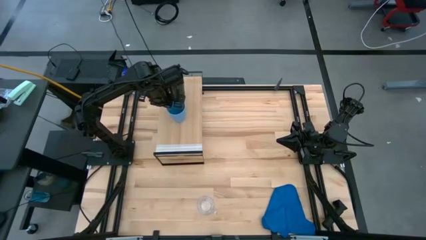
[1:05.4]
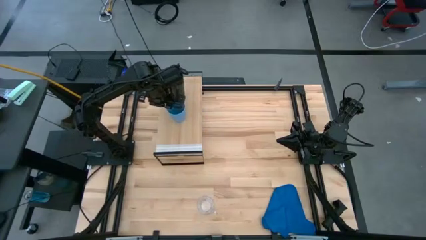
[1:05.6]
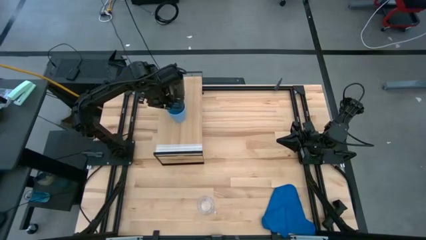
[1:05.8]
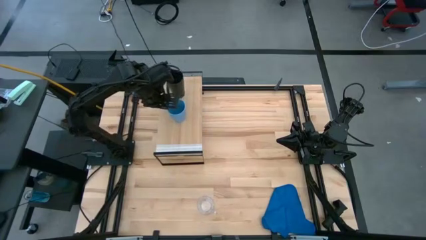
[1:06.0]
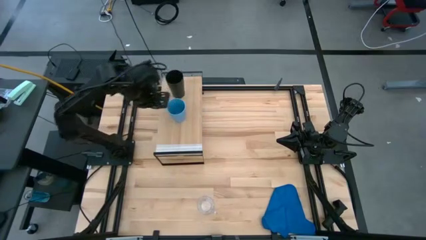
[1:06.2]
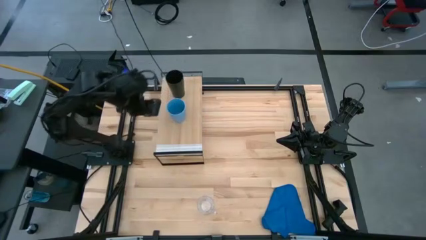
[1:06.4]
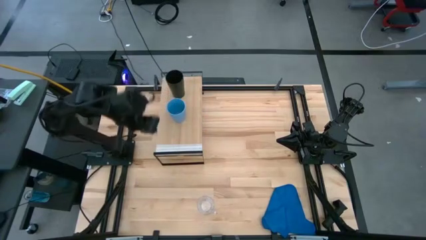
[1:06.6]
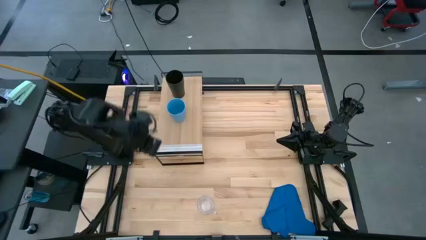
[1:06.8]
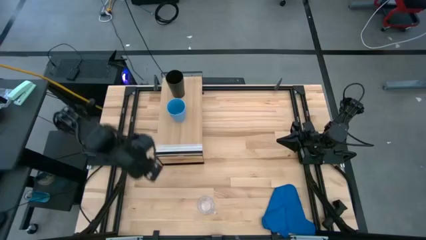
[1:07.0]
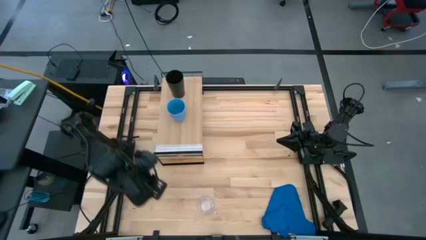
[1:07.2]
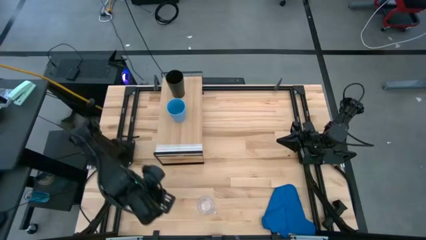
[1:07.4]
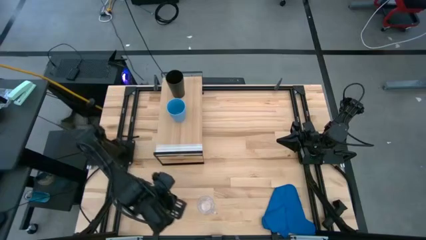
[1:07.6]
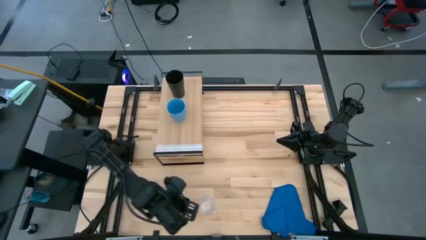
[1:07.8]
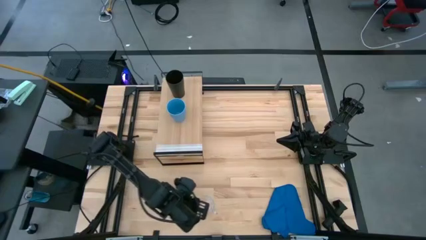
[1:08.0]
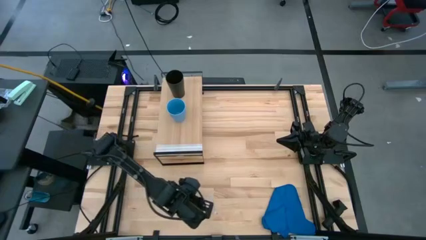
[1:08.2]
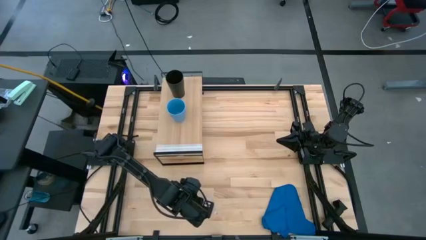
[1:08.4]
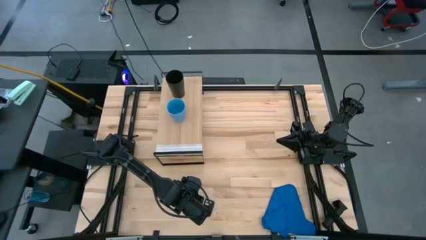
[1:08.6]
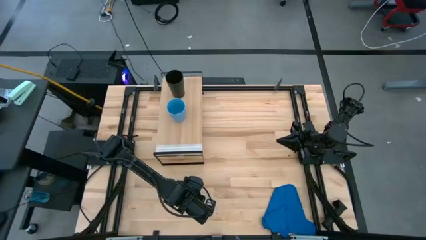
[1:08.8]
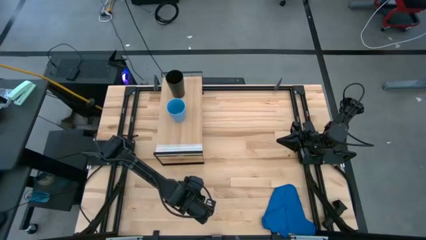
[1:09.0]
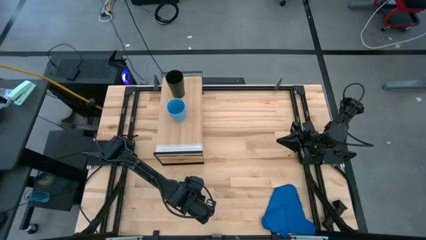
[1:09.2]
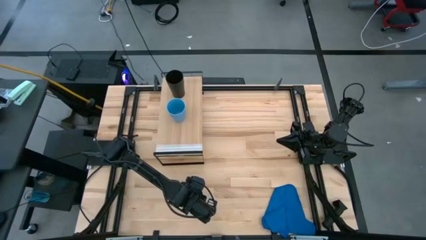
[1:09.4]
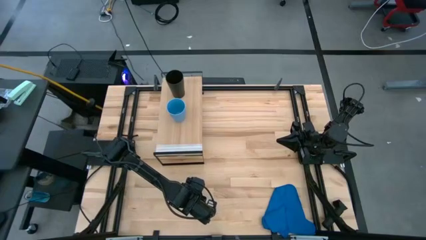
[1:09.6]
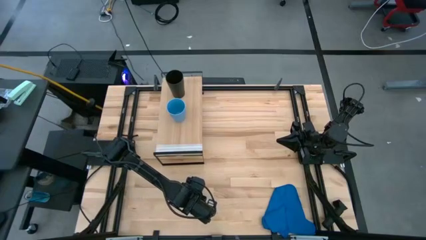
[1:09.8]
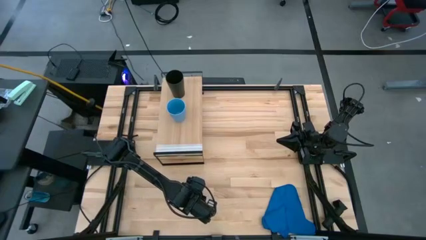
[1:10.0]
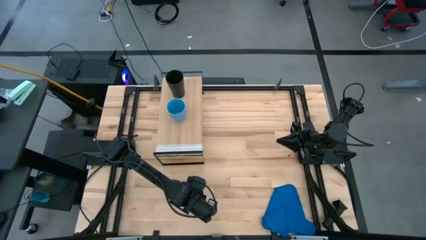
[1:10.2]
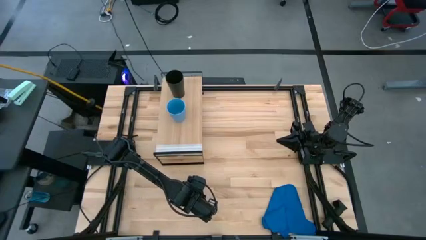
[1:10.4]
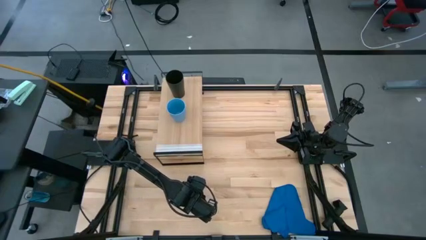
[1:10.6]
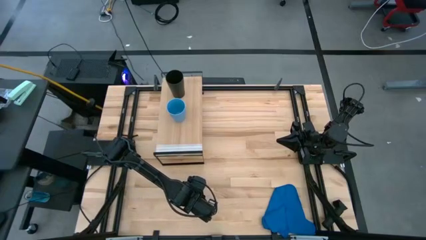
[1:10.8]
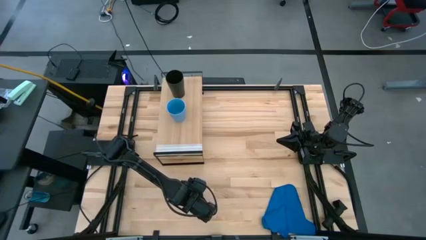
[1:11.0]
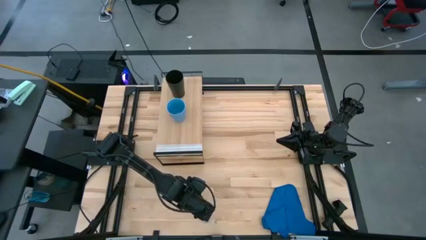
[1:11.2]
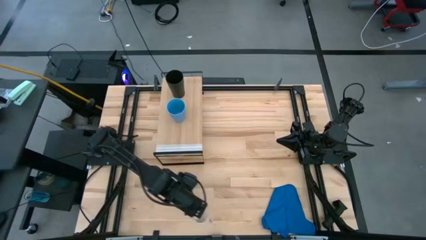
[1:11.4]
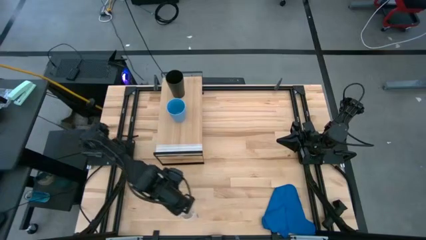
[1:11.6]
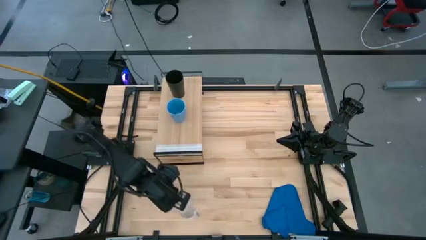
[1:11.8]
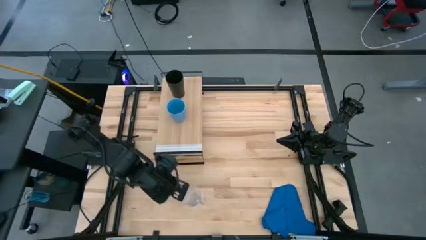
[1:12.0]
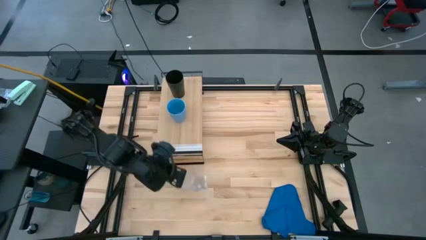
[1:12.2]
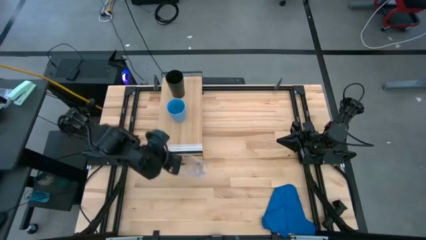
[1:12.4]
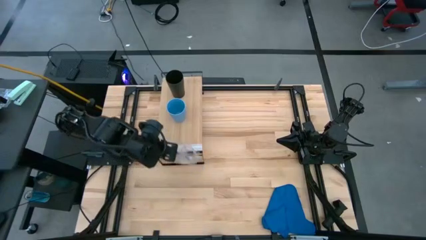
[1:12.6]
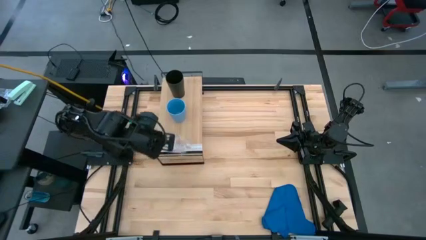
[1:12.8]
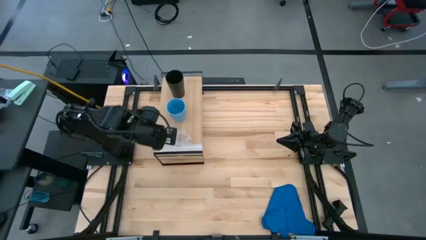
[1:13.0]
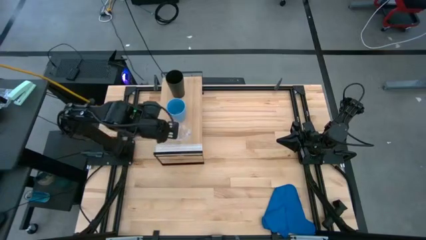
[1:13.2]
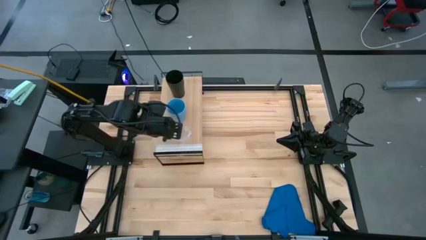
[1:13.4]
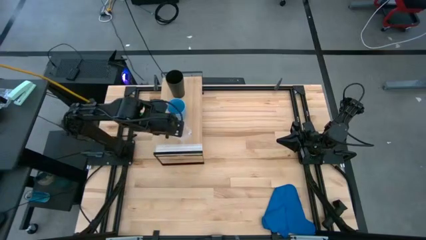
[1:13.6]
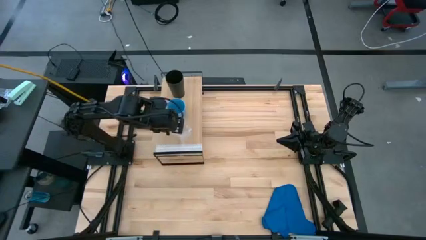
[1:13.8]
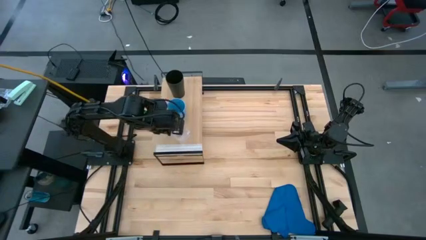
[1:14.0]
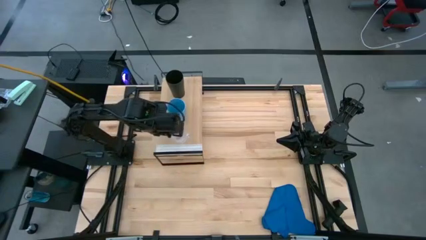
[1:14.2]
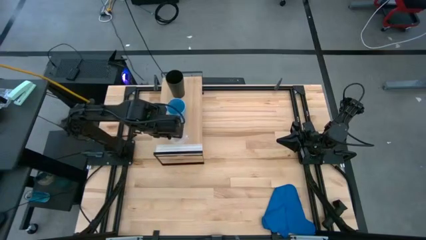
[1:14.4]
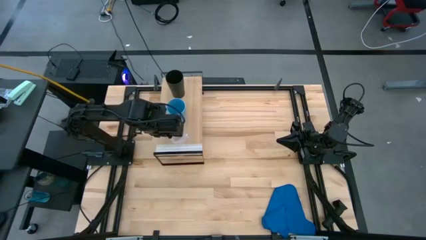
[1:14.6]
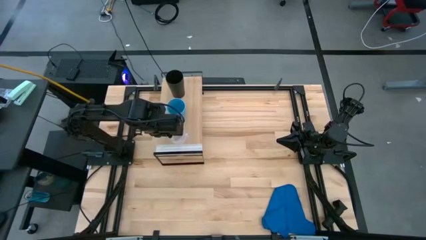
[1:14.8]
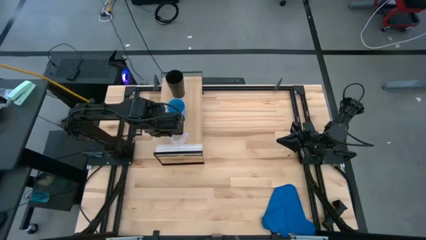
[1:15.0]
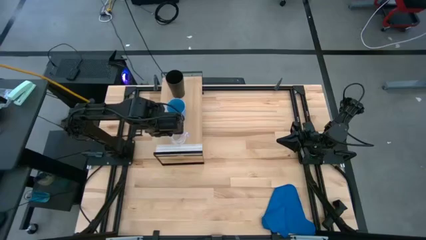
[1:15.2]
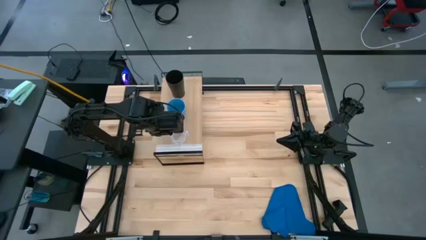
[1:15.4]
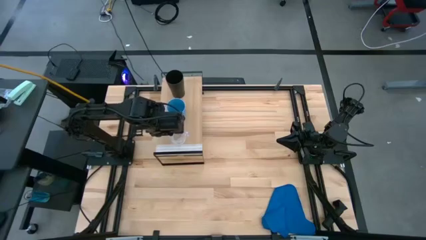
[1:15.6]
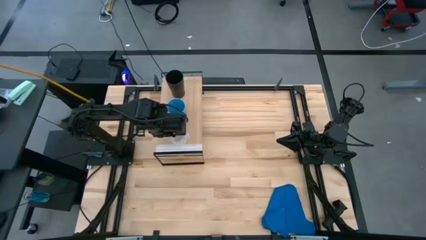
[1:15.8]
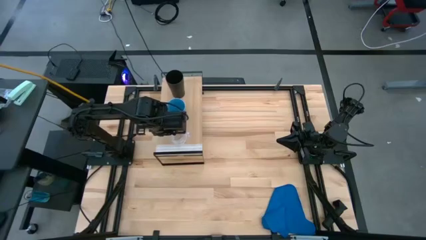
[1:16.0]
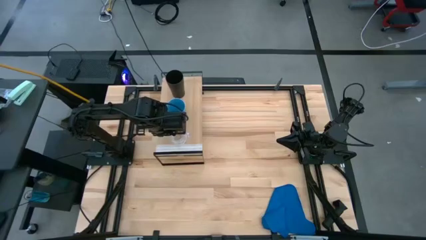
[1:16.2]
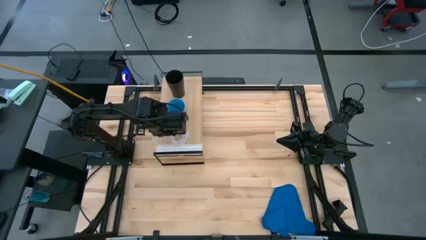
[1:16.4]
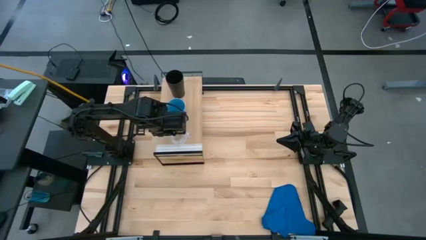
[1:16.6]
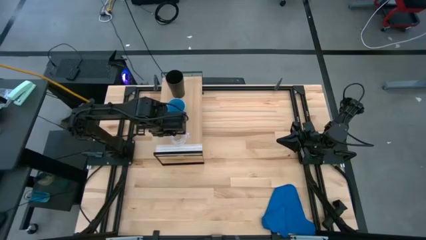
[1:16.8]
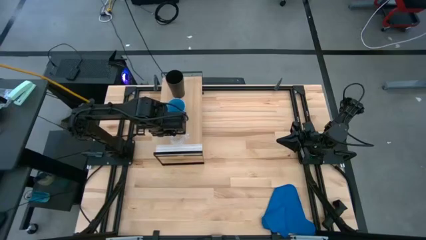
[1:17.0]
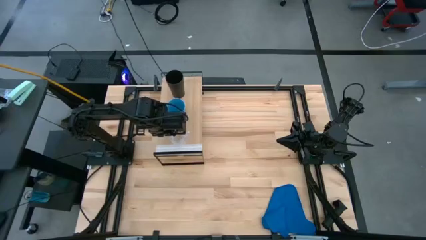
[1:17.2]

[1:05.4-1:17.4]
Task: Stack small to large cups/mugs on shelf
Put the transparent mug on the shelf
